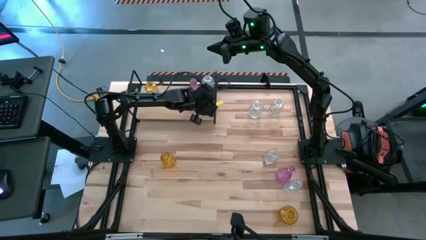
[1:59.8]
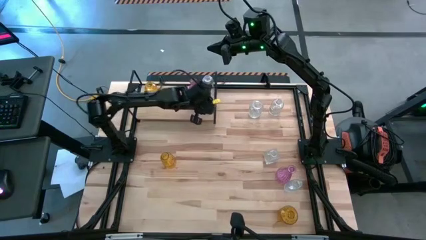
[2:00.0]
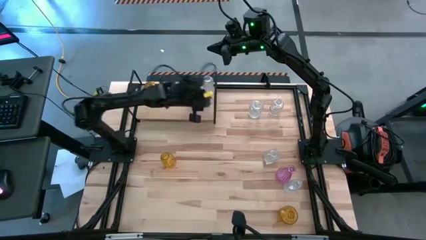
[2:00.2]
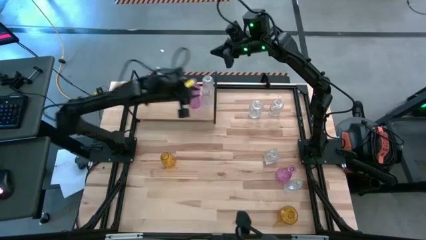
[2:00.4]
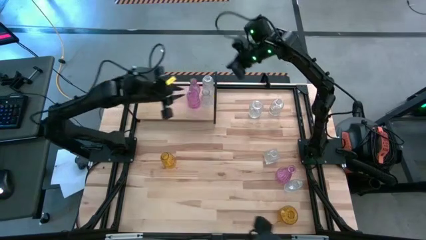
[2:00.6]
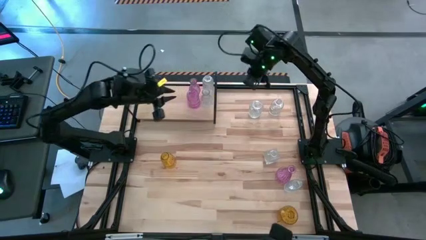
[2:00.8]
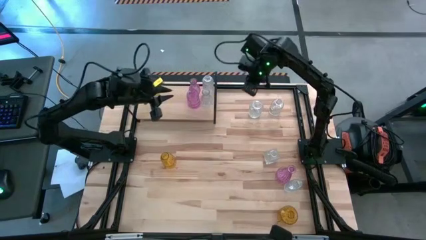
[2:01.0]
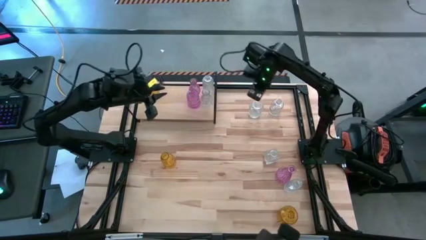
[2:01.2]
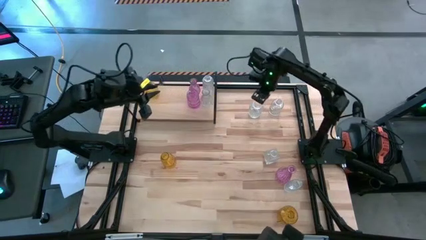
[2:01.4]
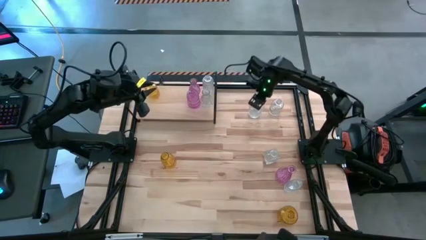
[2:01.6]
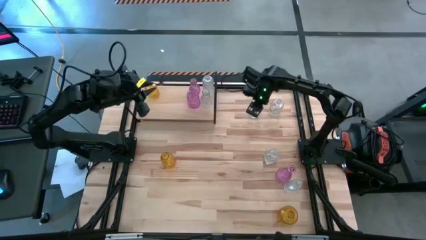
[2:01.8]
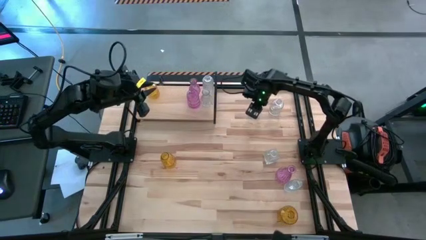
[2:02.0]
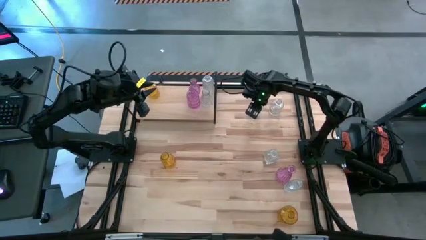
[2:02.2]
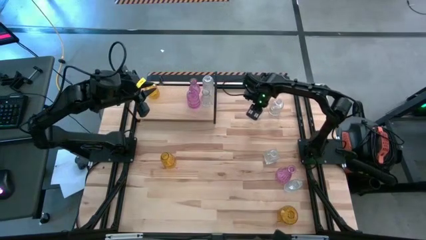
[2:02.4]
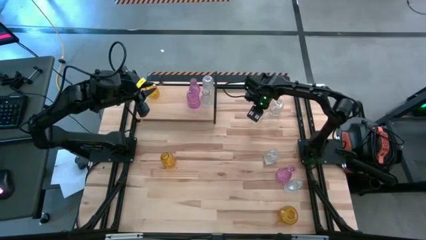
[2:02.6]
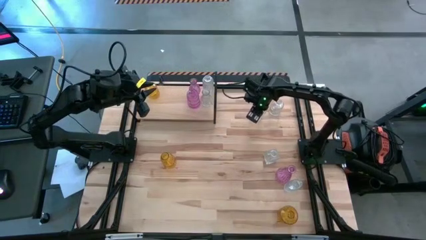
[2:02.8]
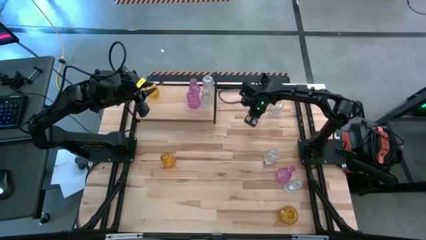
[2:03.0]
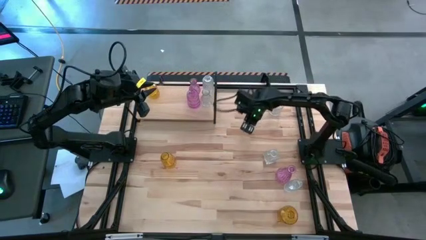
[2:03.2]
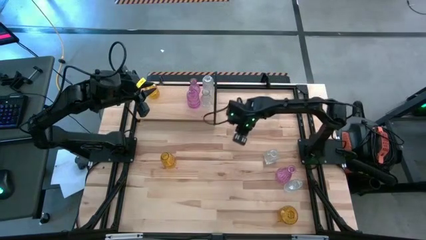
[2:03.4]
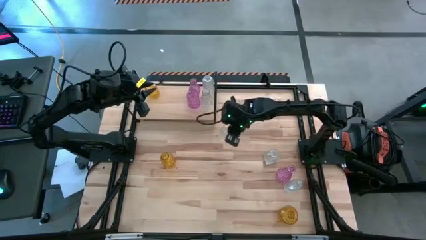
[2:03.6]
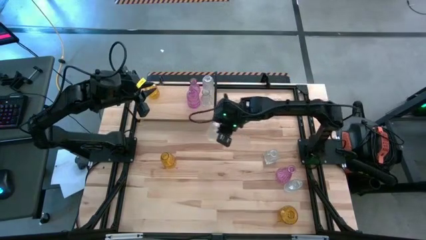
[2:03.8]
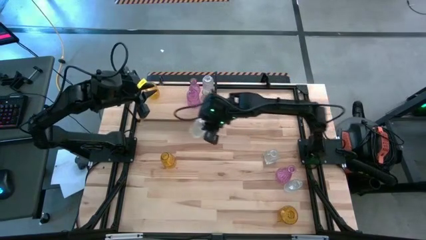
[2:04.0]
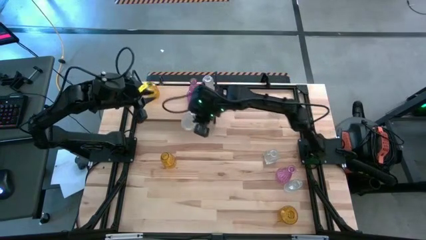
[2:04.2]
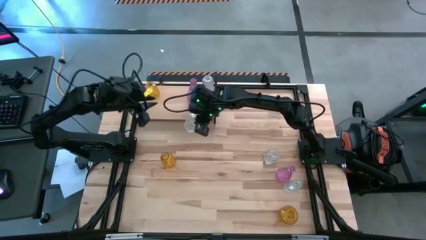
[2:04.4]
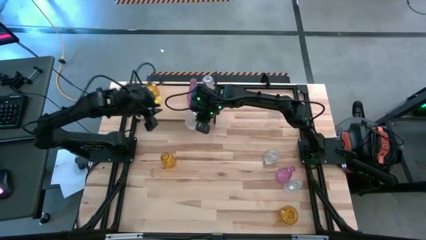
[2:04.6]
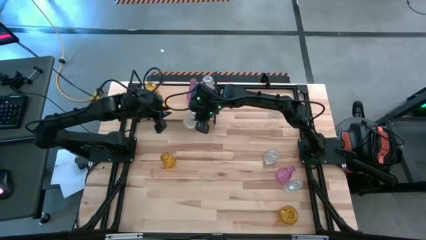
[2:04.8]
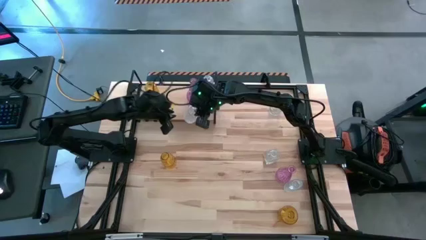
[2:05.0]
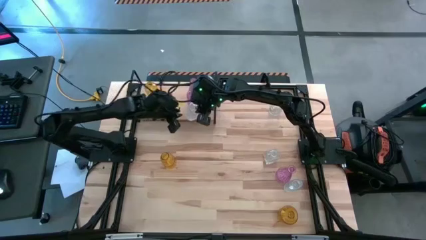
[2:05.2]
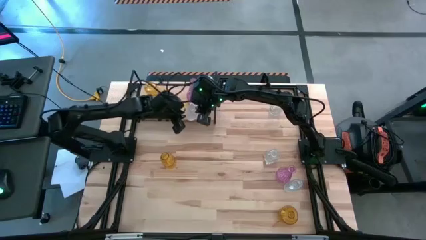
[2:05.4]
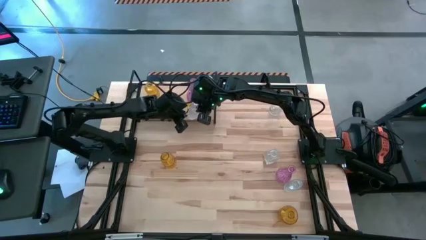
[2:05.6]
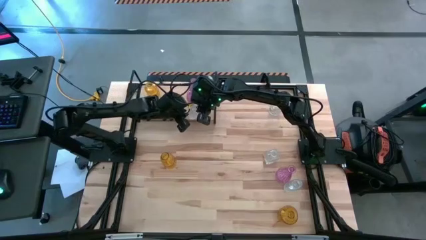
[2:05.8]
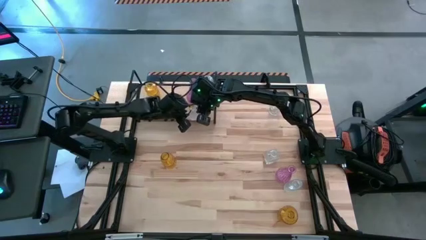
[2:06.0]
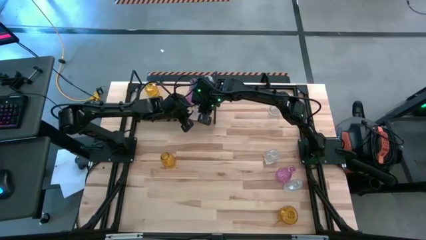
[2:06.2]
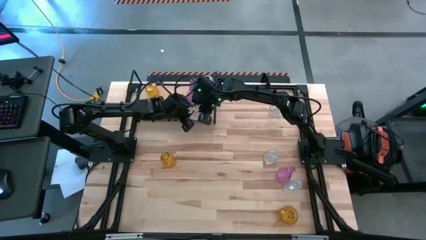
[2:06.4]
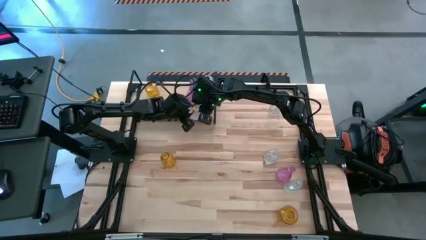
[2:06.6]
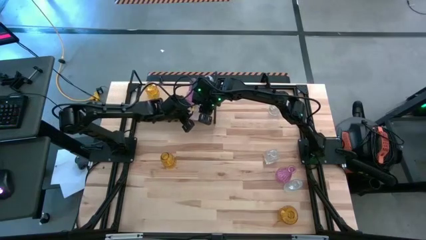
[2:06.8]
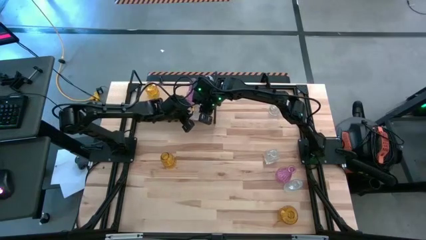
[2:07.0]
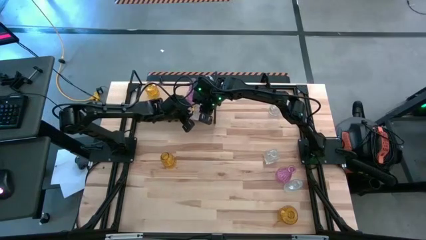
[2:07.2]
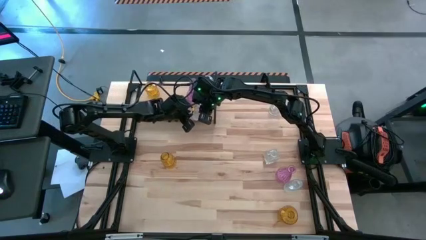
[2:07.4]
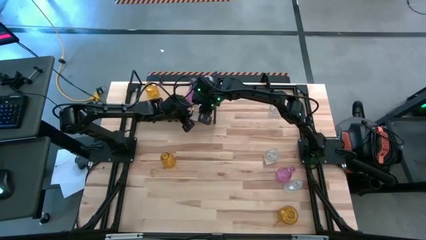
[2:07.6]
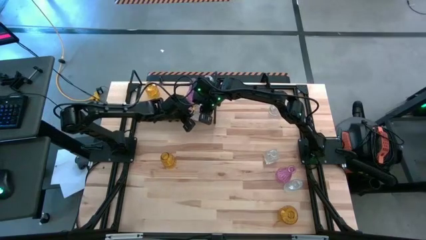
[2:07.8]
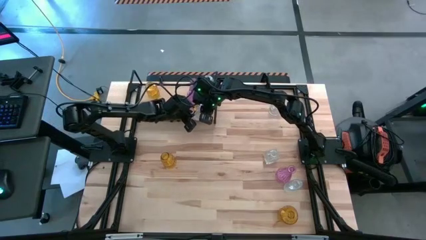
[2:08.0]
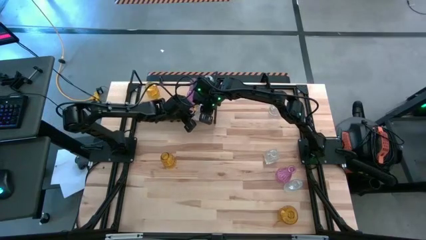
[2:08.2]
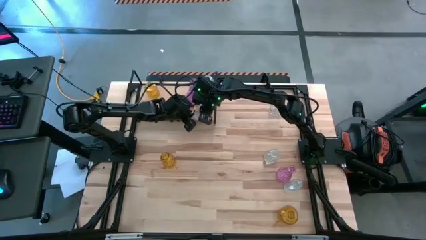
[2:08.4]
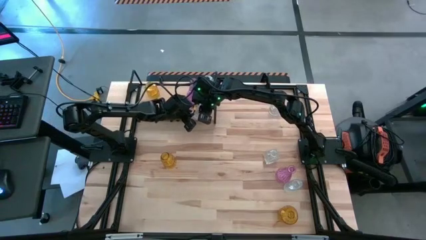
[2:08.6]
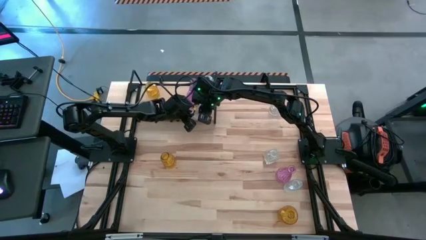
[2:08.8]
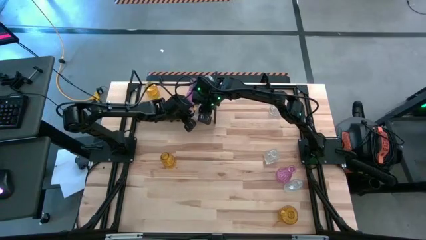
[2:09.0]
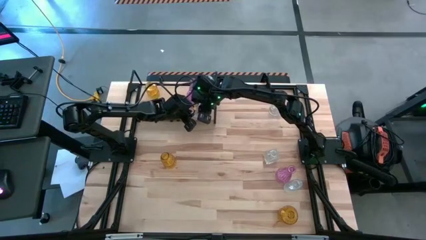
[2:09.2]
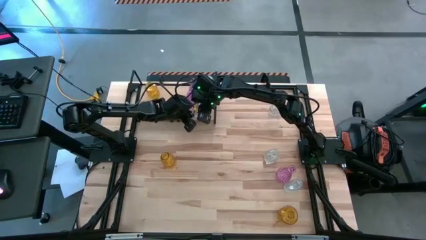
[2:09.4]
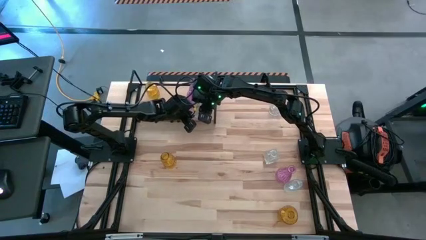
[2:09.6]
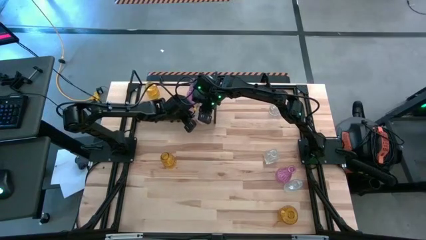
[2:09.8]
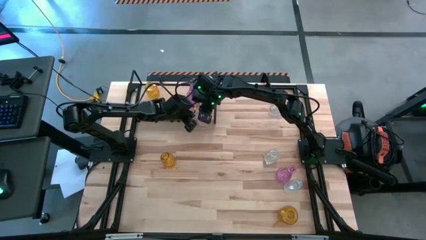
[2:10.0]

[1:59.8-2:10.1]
Task: sort vases onto shelf
Put the transparent vase on the shelf aligned with the other transparent vases

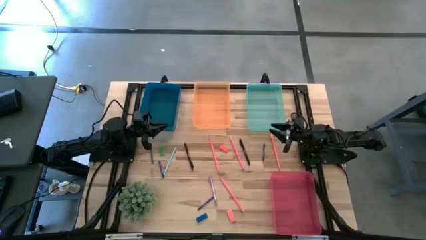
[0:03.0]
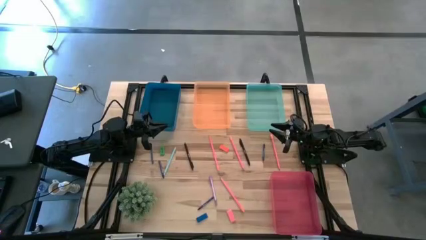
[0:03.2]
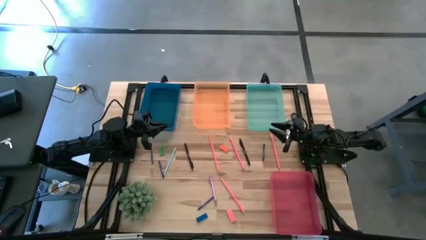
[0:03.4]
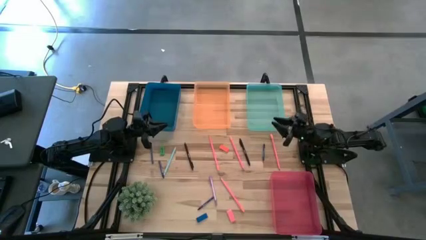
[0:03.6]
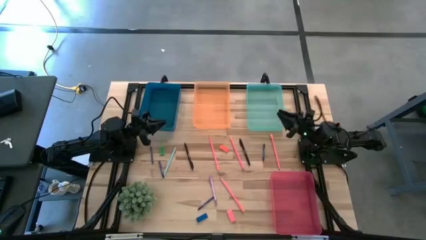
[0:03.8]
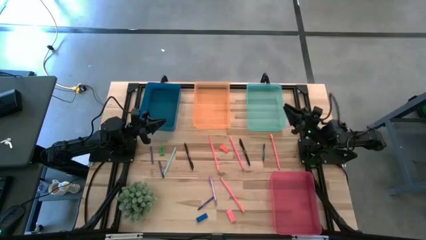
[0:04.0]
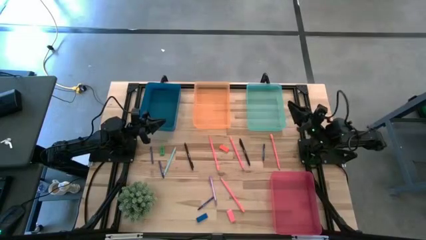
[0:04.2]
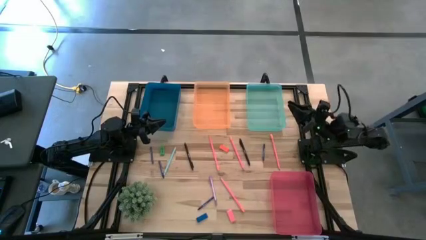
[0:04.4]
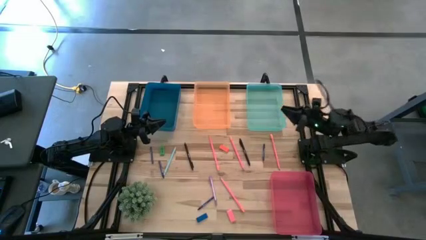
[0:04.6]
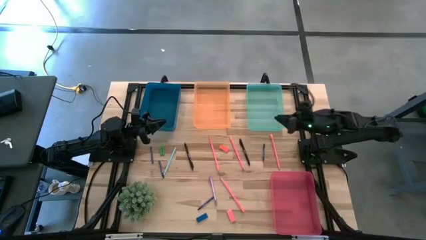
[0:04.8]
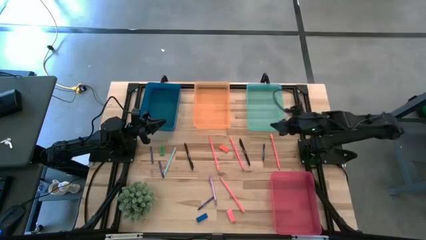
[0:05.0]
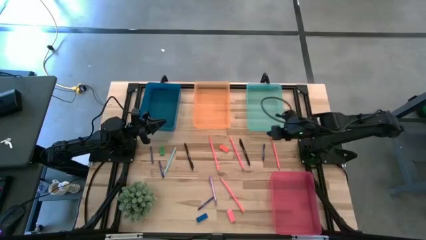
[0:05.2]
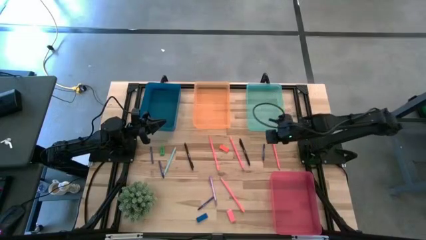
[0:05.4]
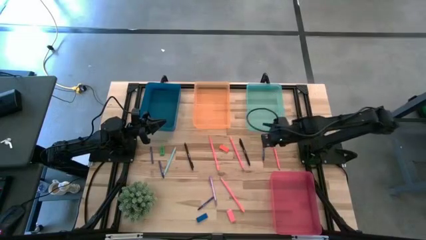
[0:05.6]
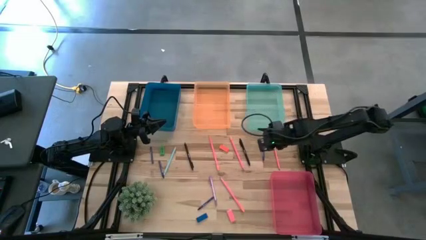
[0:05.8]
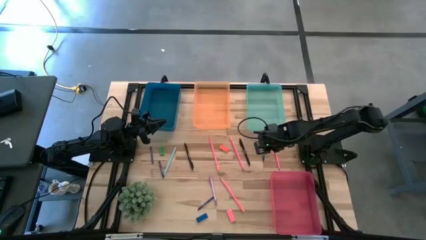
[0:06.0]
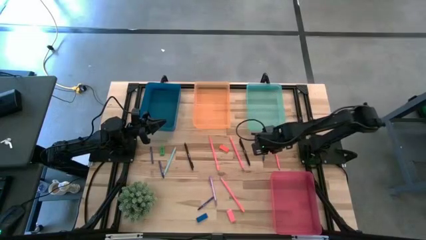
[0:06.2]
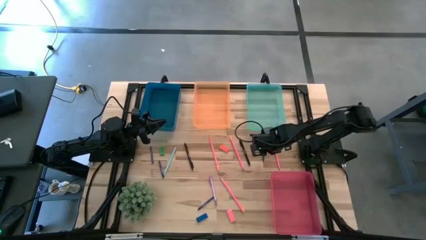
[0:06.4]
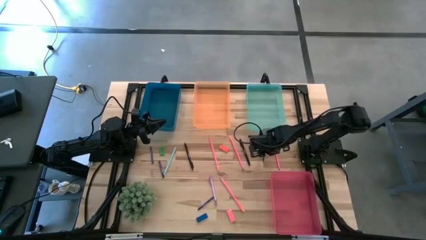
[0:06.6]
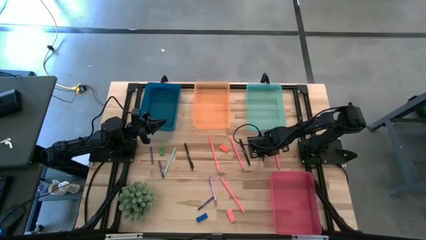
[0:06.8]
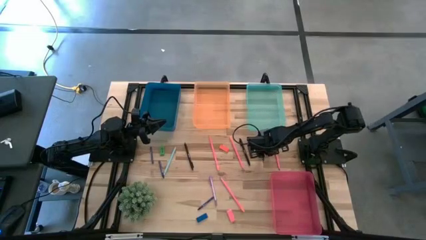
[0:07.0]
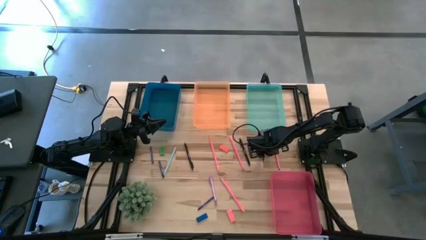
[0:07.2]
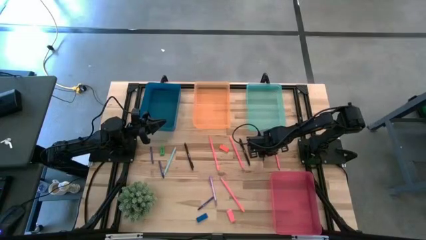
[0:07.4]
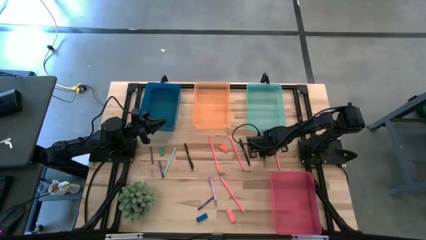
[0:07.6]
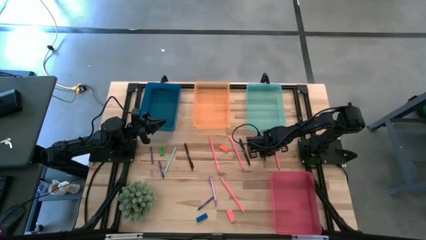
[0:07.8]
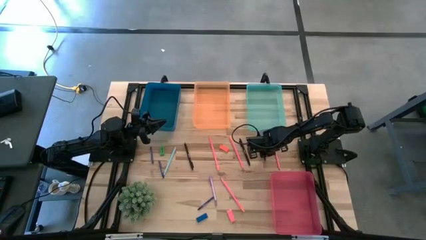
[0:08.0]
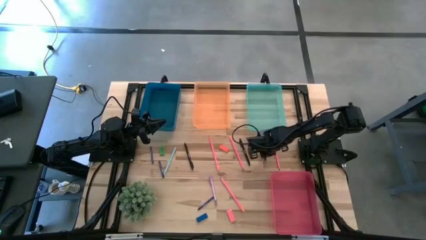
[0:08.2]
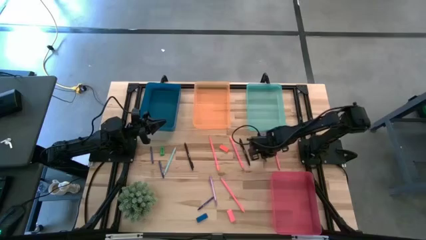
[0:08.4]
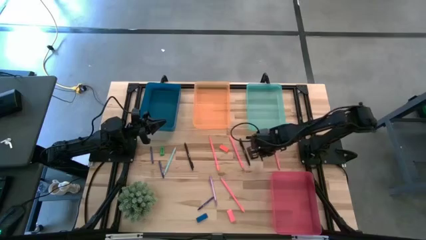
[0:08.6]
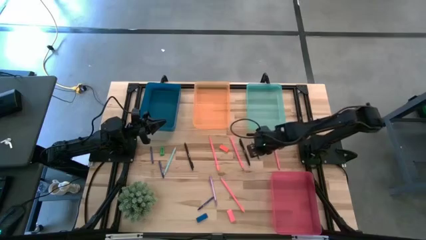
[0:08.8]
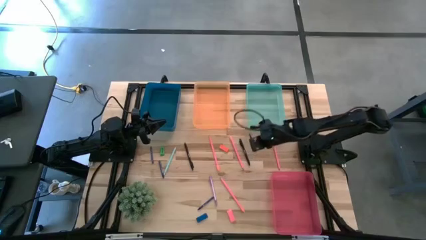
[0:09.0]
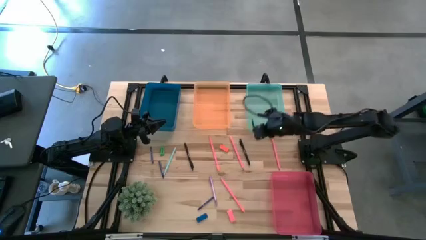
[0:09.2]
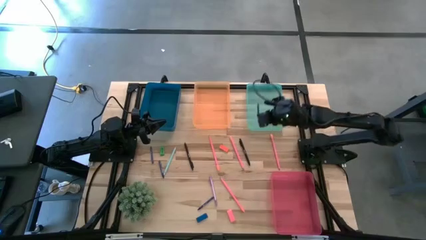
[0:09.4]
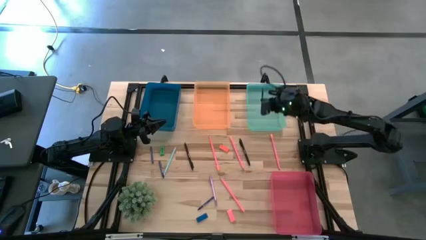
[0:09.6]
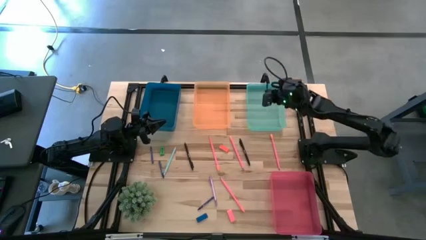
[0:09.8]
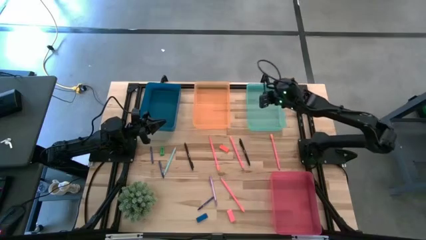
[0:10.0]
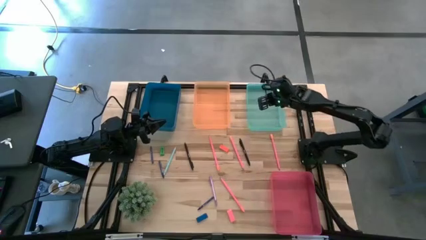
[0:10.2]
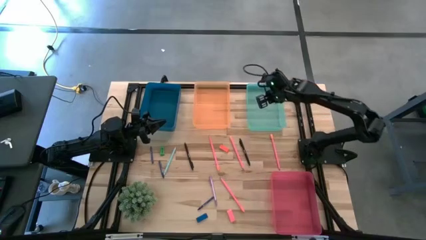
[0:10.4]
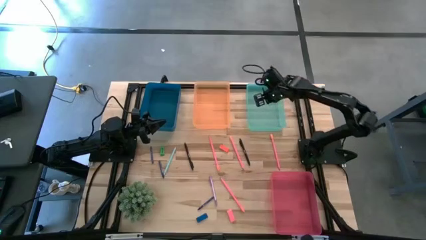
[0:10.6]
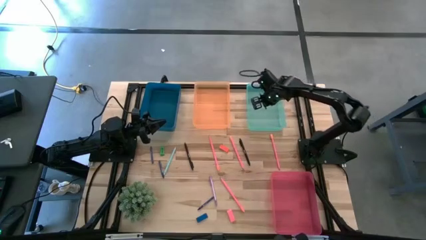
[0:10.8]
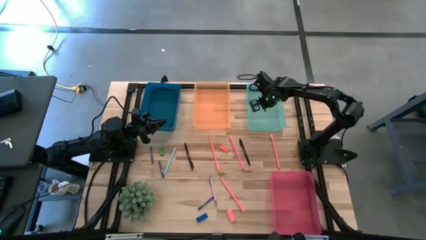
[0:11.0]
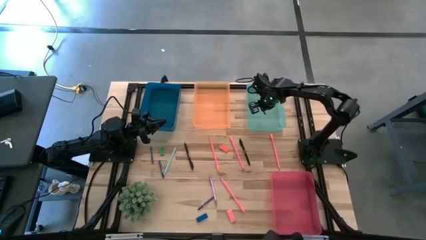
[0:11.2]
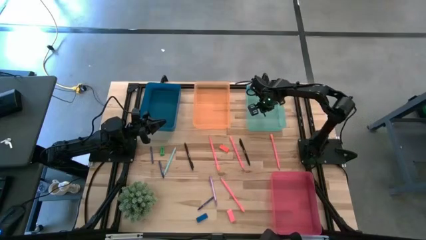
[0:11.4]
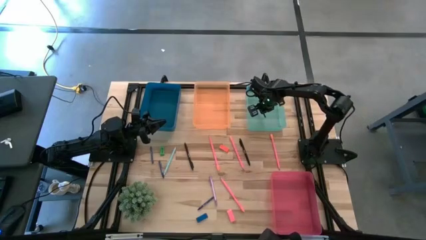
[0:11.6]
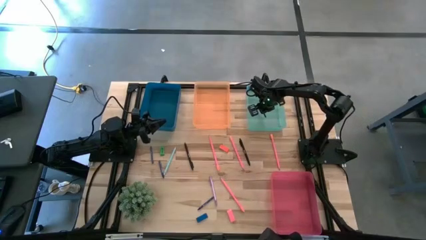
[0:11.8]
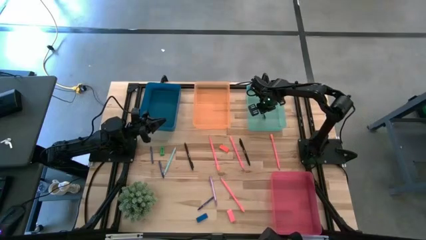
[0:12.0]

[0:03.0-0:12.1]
Task: Sort crayons/erasers/pens/pencils in bins
Put the blue crayon into the green bin
